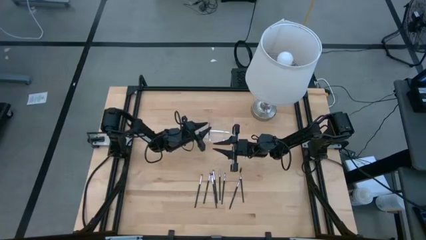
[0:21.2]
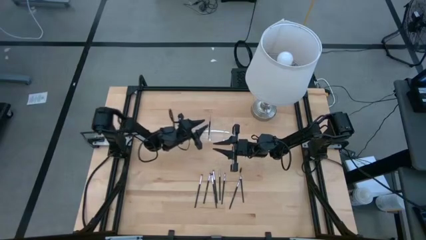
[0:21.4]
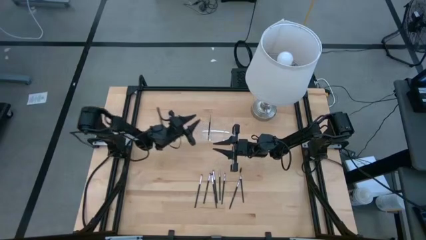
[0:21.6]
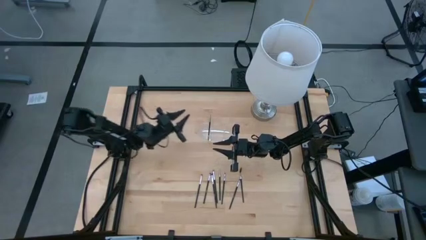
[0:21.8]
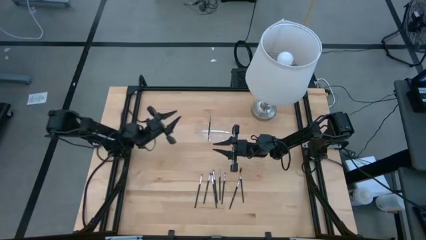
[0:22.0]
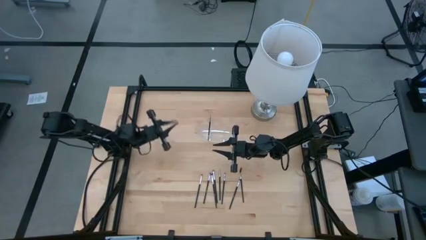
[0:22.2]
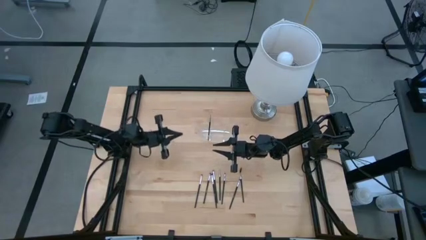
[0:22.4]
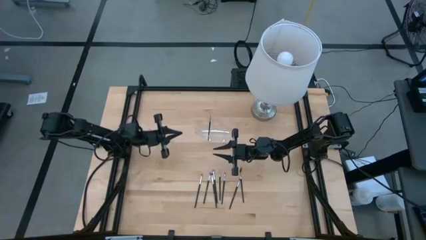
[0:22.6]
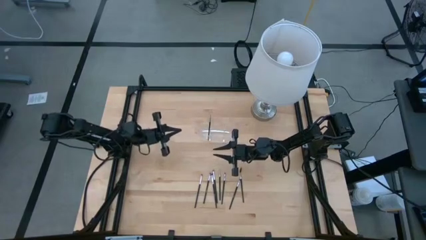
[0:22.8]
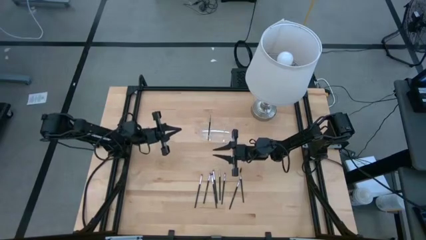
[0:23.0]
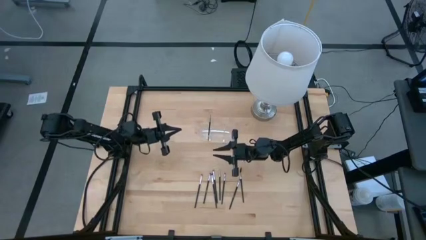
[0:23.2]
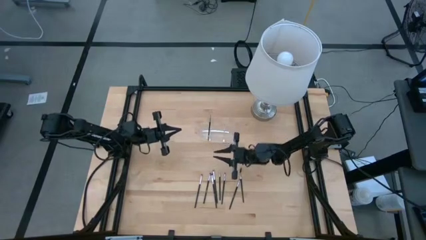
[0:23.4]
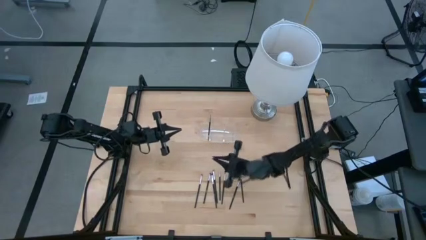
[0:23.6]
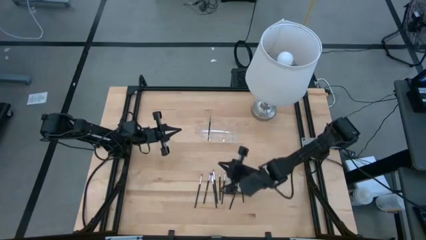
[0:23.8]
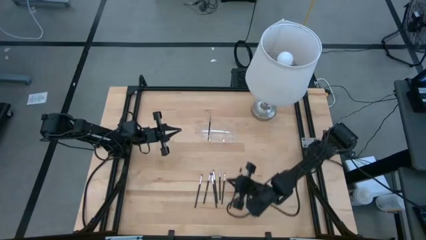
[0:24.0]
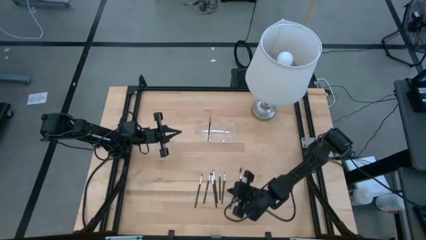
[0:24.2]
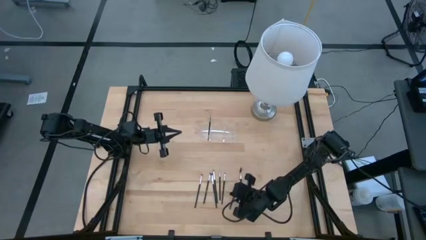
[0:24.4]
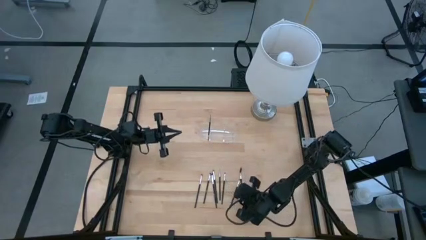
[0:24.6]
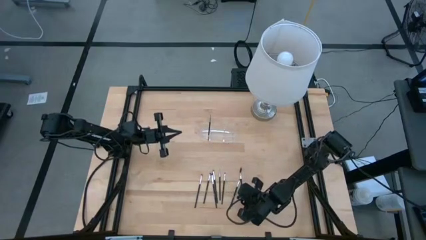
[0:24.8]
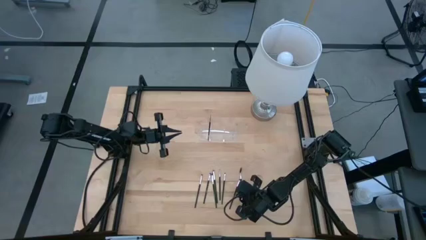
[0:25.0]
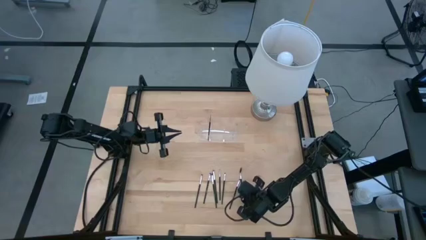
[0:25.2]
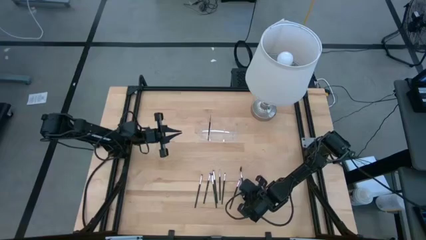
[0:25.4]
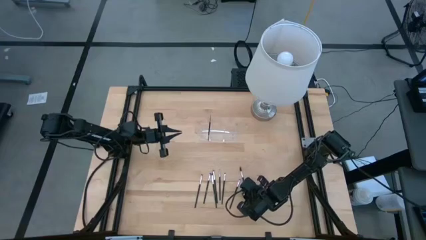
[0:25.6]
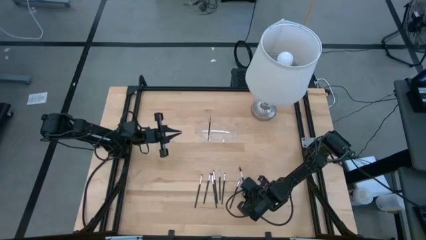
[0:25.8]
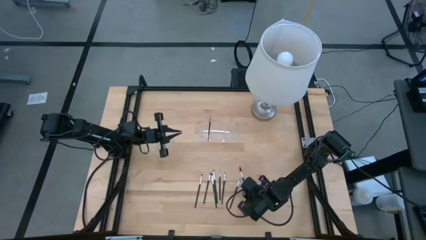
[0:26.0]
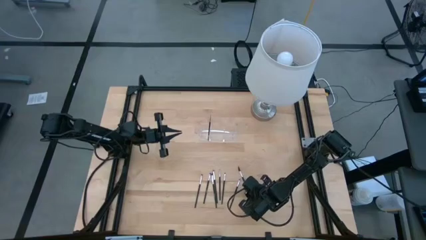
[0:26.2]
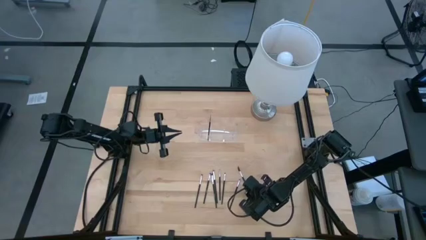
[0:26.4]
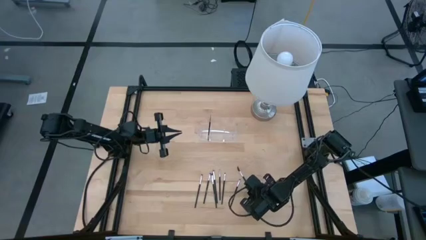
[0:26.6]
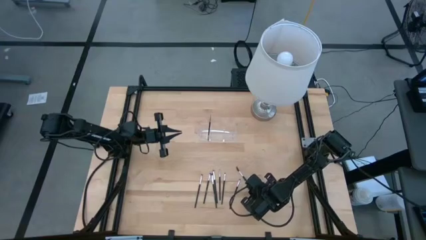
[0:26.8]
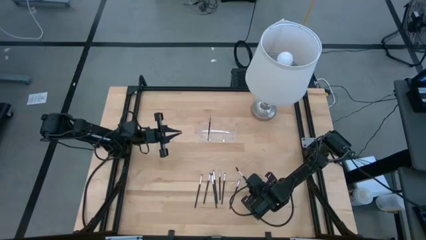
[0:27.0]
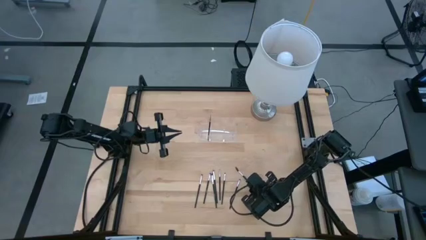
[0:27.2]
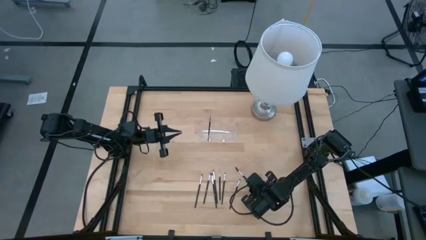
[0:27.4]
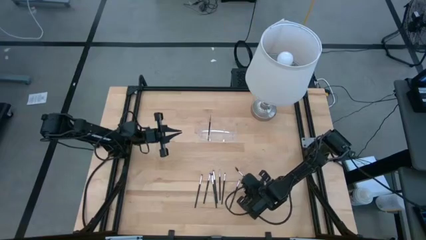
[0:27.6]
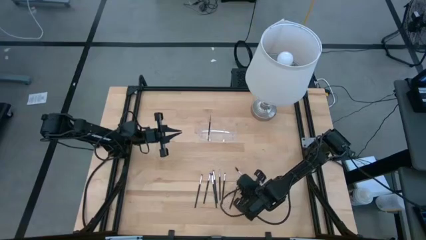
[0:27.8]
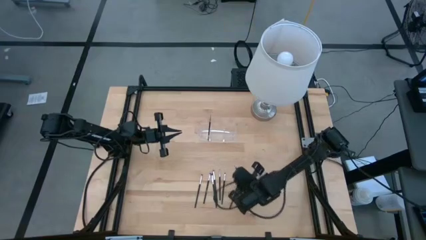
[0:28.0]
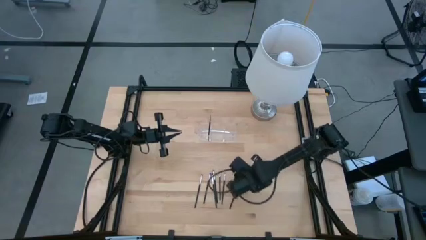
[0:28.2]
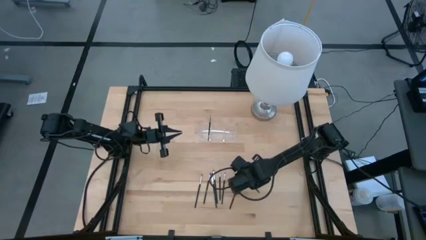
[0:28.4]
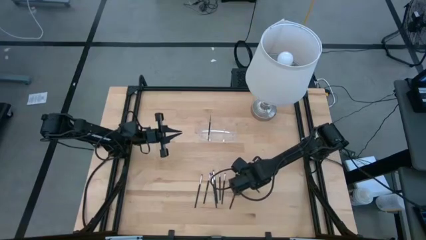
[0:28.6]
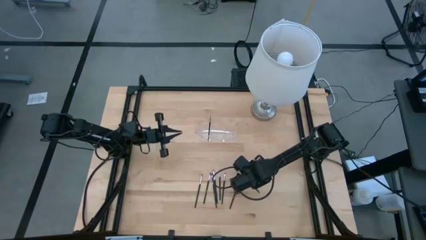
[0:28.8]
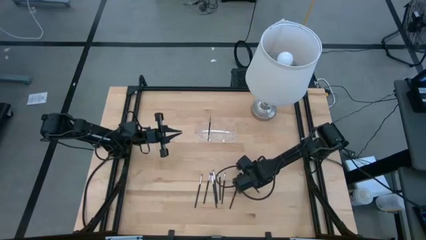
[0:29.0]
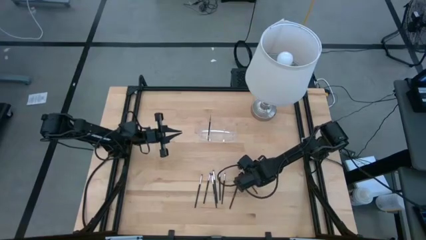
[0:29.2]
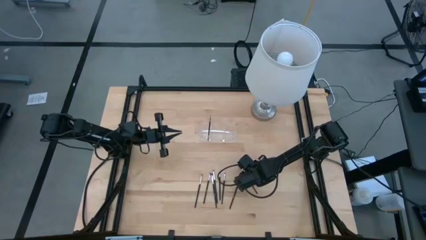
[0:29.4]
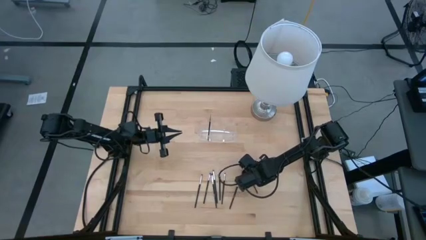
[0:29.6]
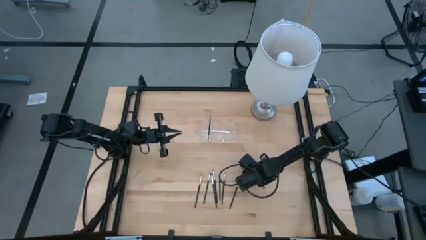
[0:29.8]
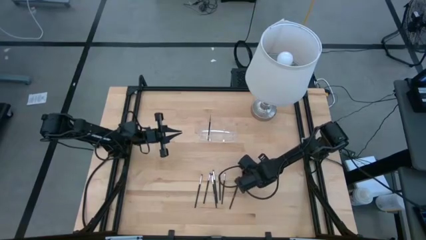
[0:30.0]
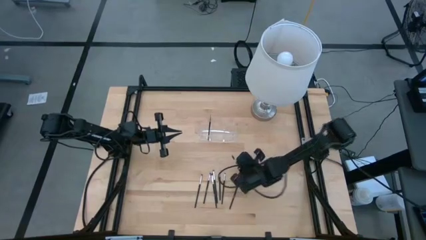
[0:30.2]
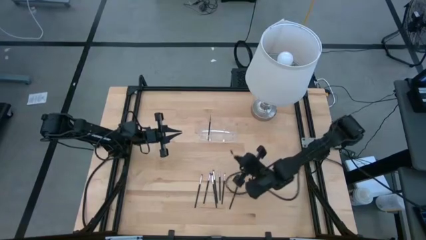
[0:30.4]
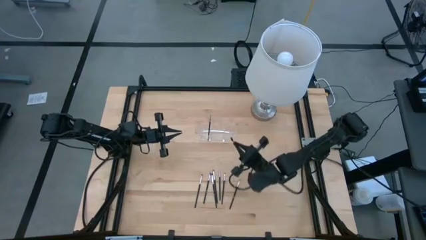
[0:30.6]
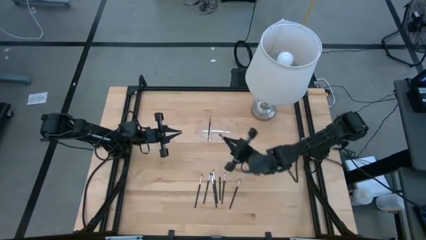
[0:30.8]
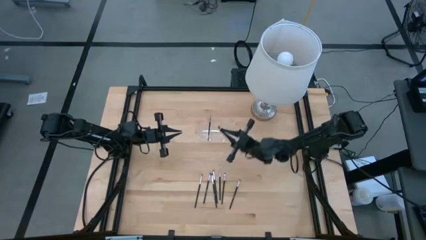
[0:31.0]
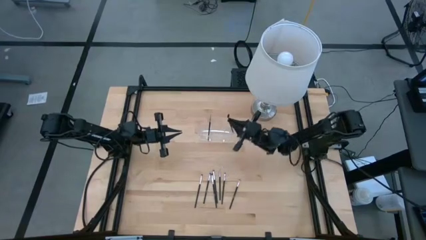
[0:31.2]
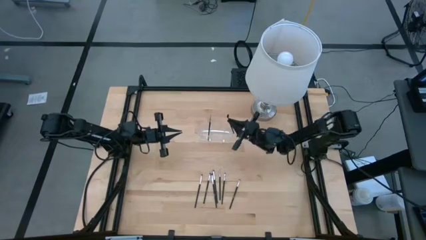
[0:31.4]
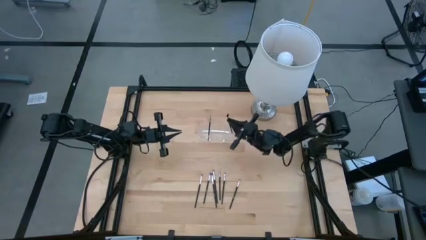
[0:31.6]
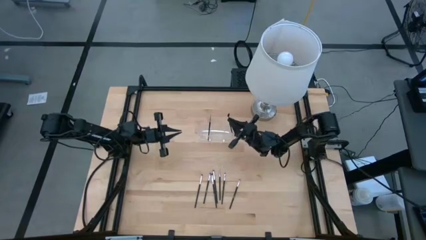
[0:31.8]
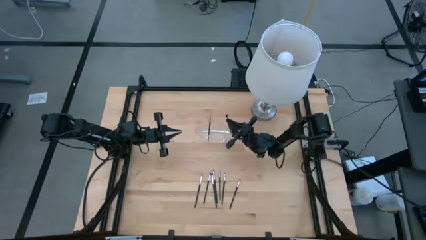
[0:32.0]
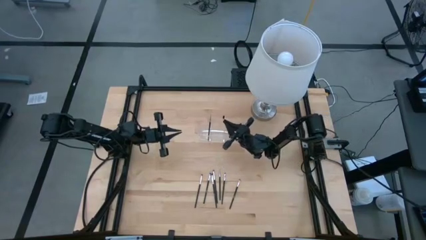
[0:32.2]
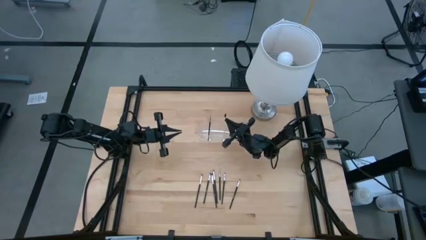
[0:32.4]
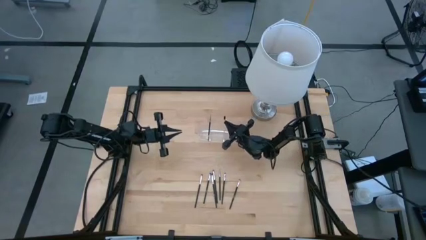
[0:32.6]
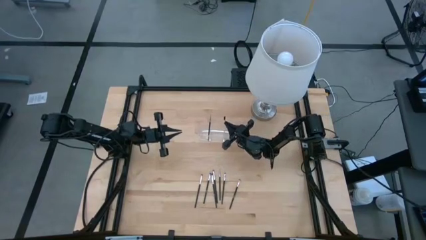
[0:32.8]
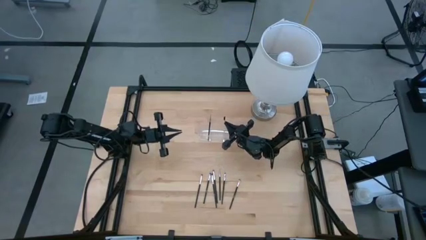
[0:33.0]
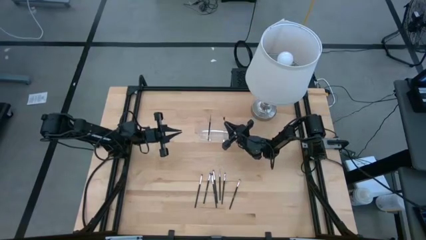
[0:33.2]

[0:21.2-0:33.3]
Task: Put items in baskets/containers
Put the black lash brush transparent organizer
